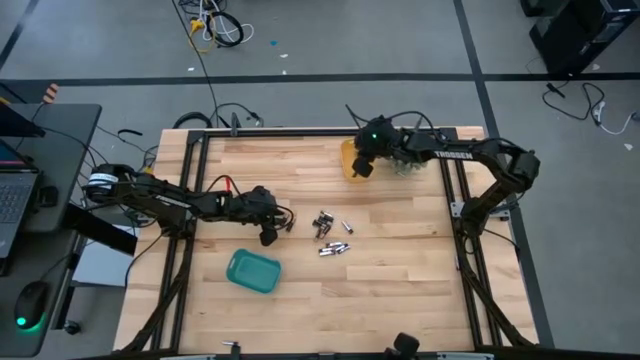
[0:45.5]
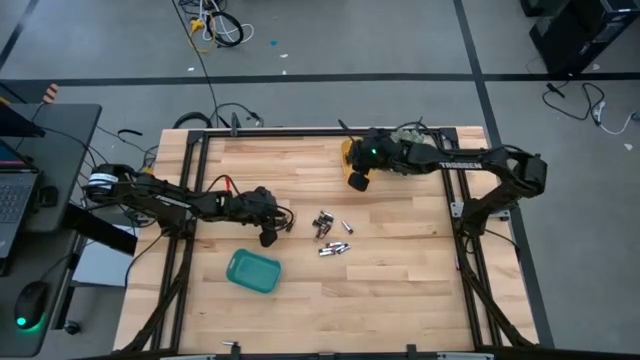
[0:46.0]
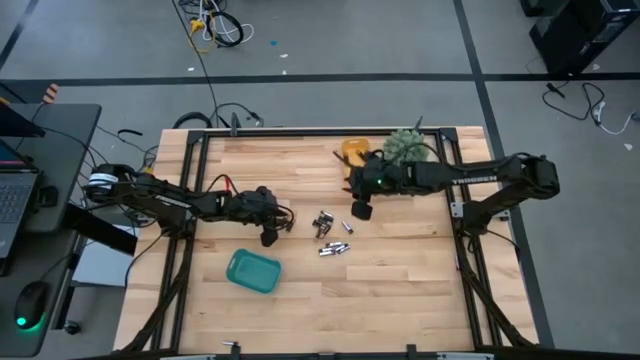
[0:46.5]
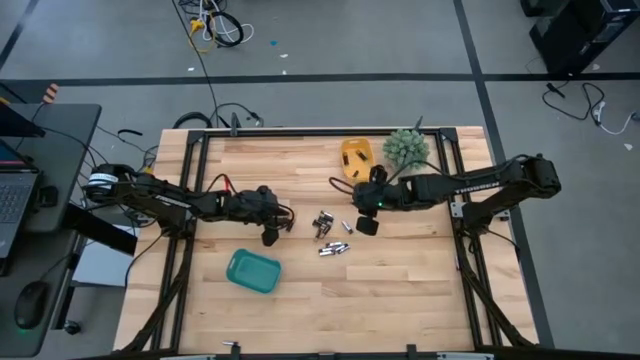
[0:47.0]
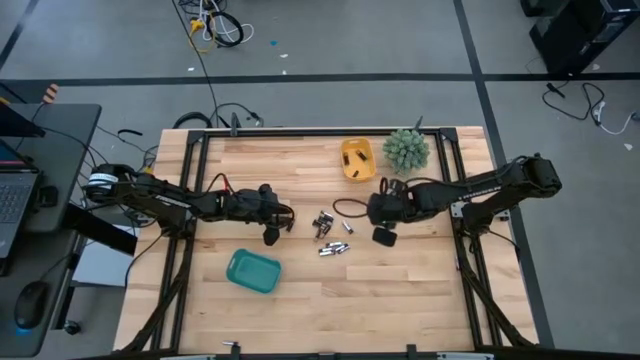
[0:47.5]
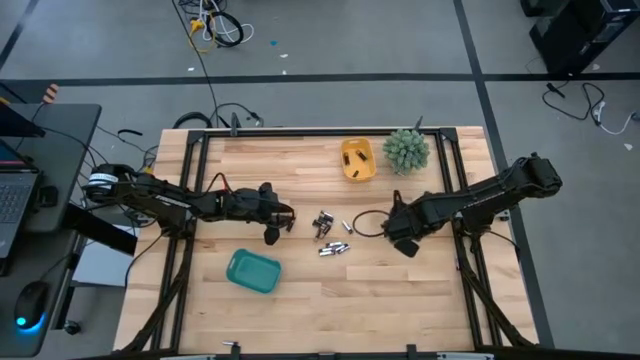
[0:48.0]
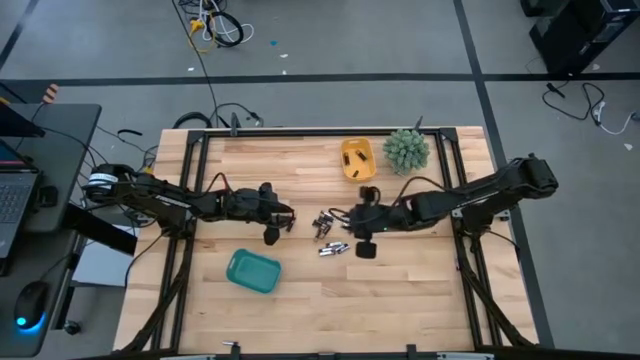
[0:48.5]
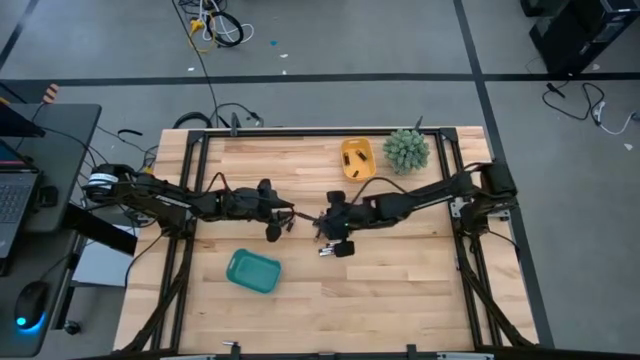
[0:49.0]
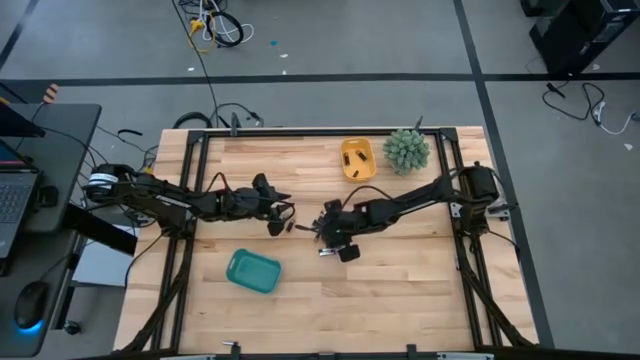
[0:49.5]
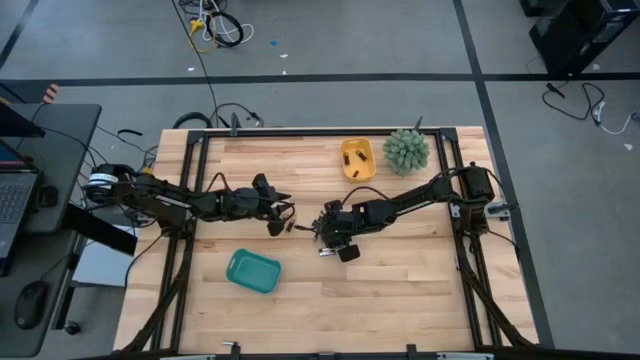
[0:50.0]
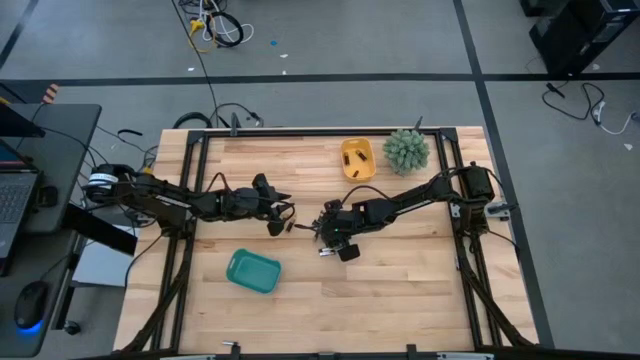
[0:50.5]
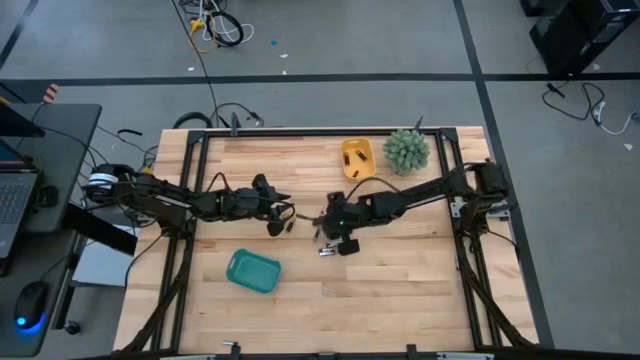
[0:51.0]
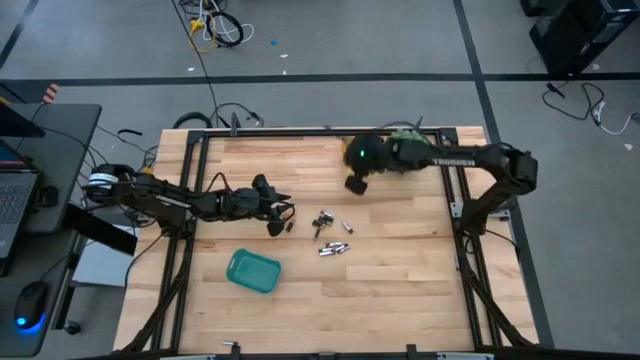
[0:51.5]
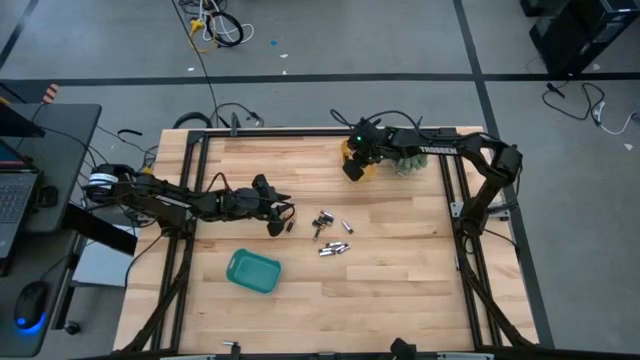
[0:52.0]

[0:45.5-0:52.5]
Task: Sort batteries
Put the black battery into the yellow bin

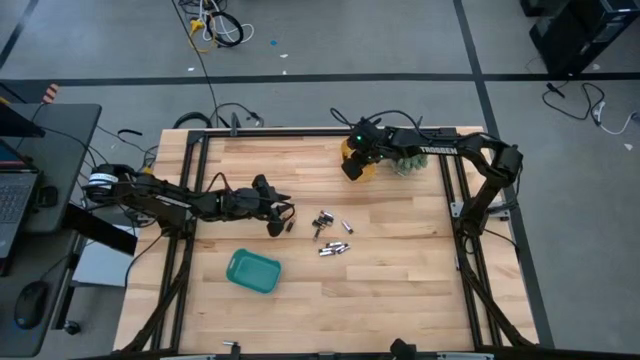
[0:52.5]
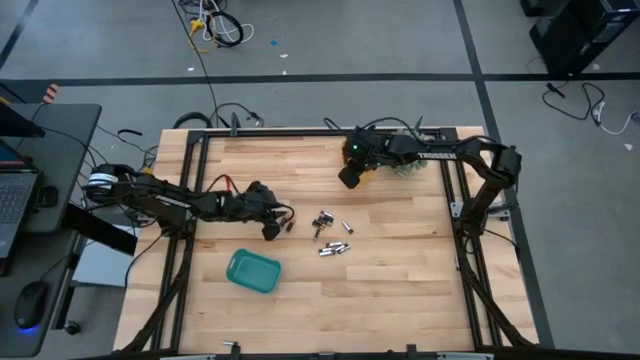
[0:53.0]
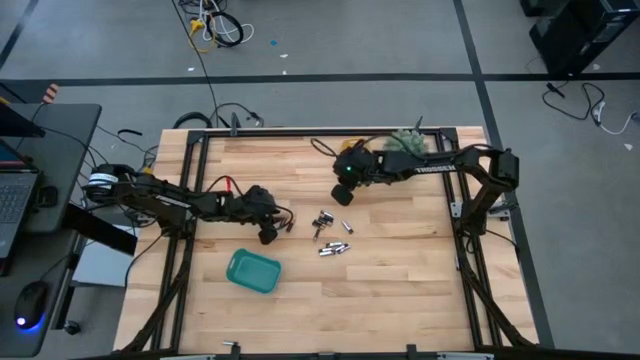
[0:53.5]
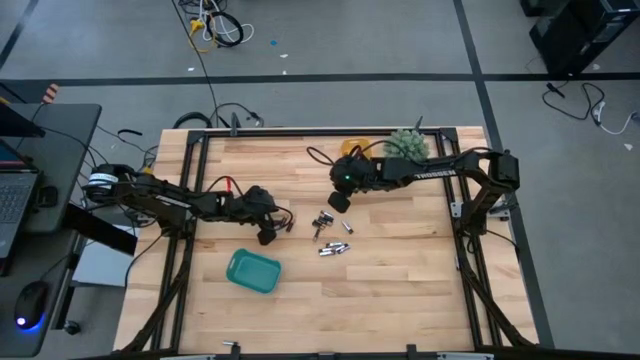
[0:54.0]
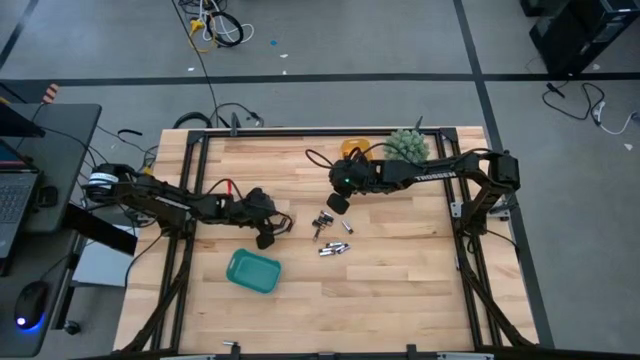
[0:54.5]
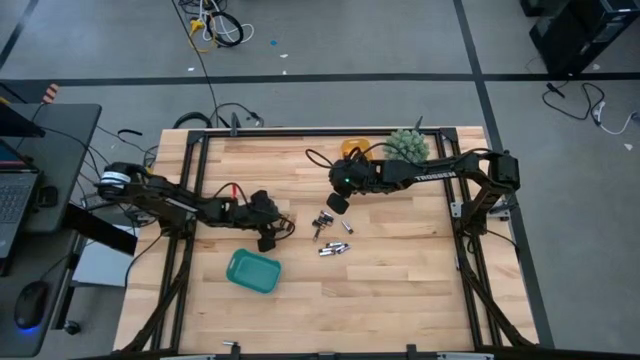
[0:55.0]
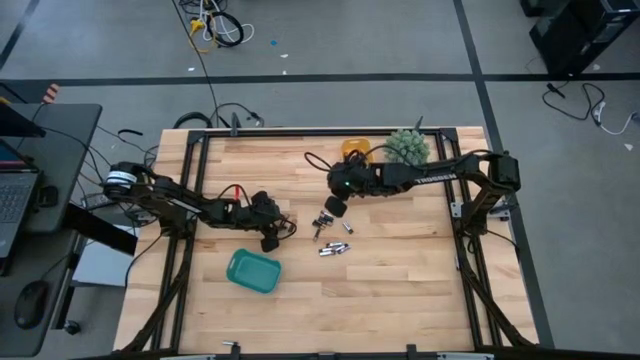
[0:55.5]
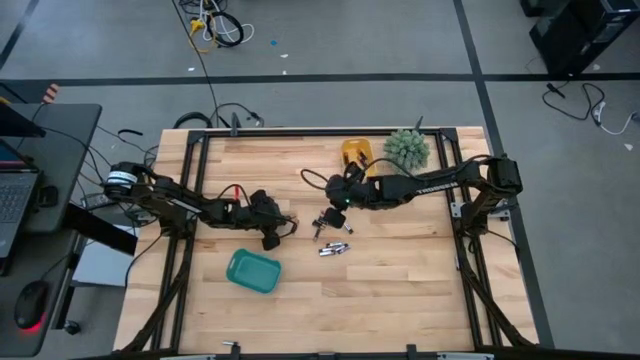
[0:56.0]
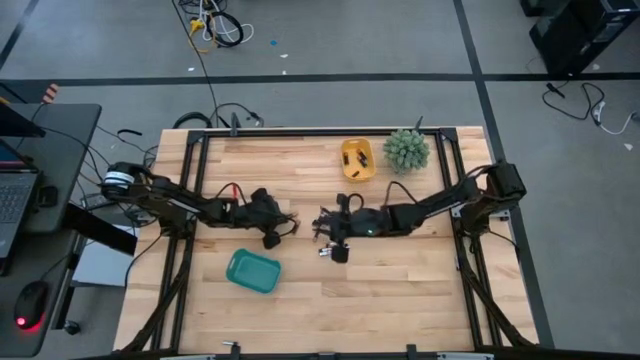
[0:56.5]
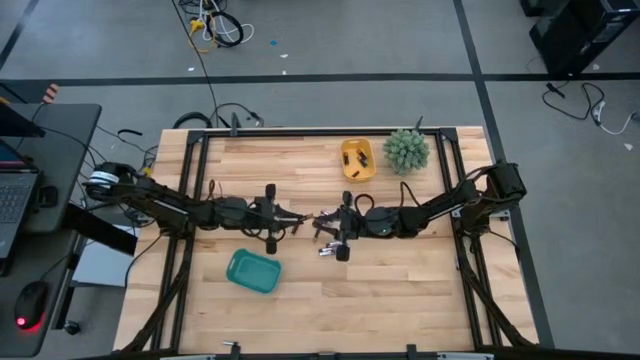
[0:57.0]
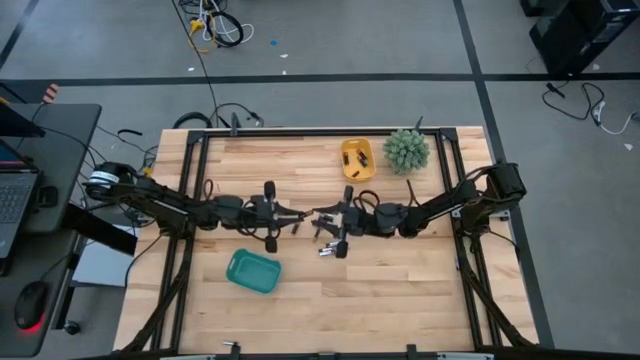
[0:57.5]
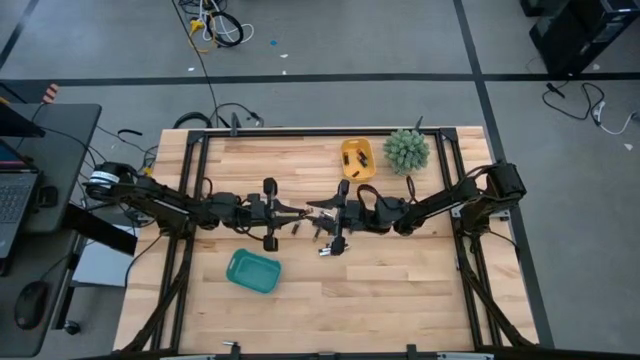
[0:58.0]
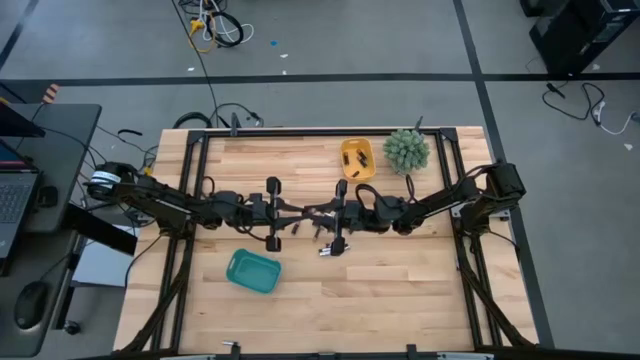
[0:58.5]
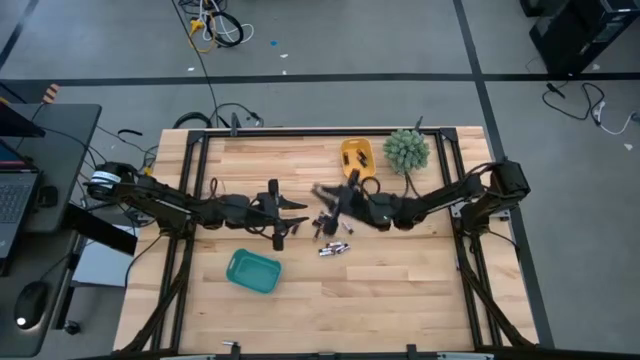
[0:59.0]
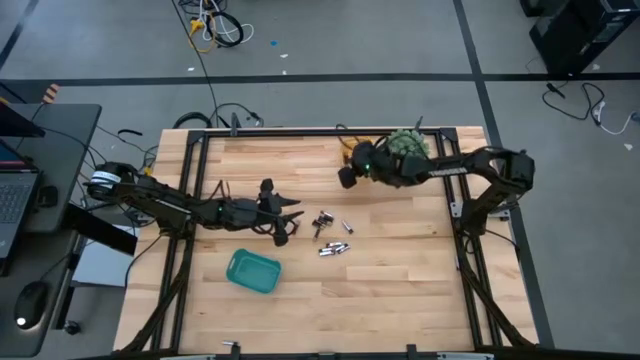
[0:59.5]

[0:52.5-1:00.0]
Put the black battery into the yellow bin

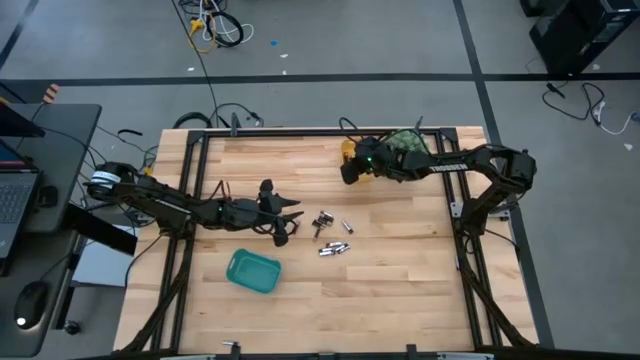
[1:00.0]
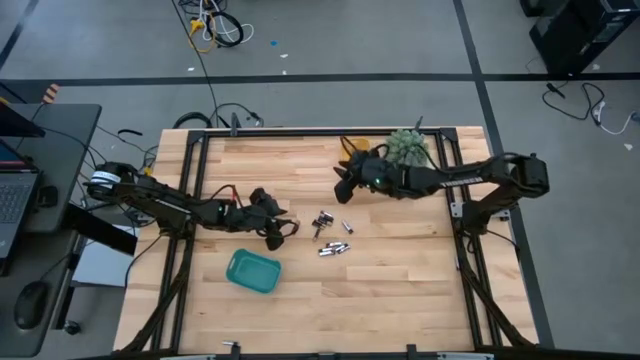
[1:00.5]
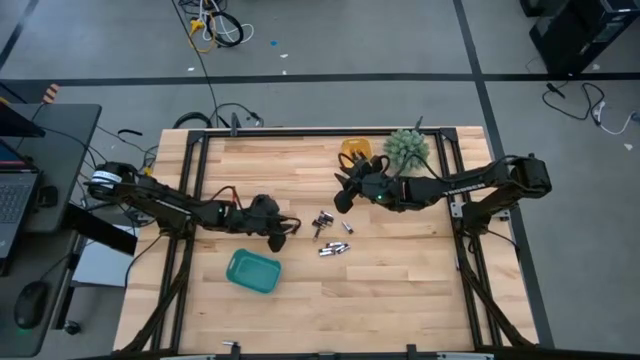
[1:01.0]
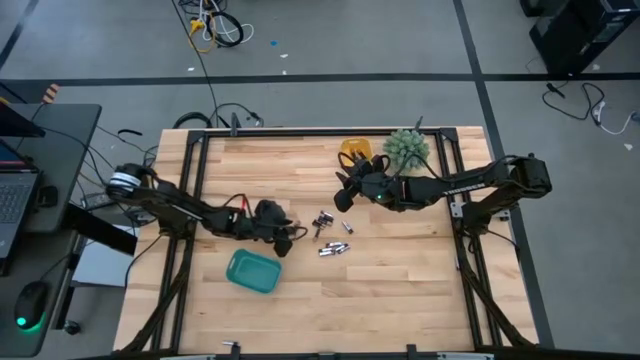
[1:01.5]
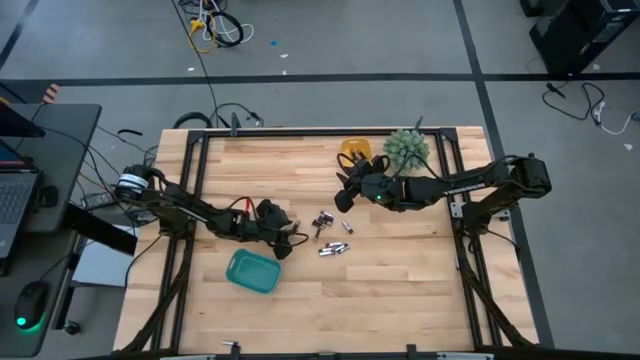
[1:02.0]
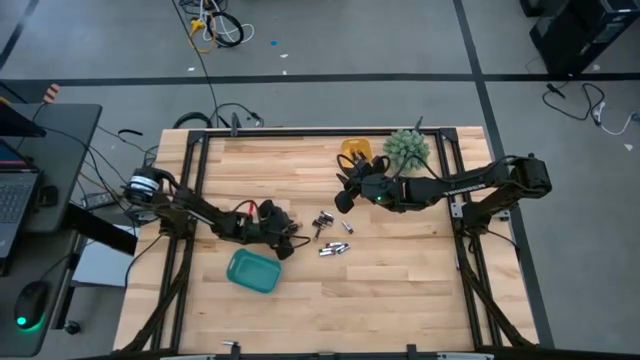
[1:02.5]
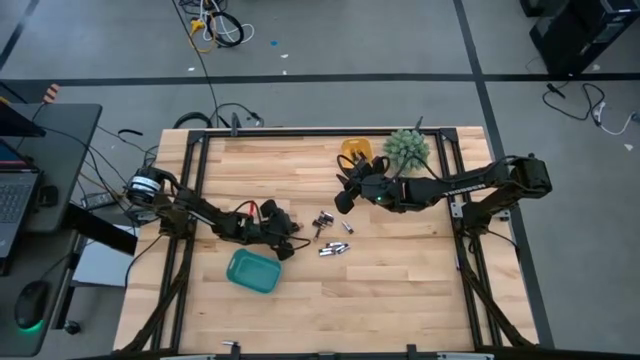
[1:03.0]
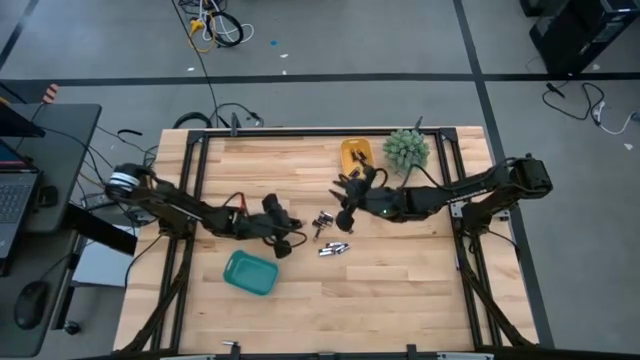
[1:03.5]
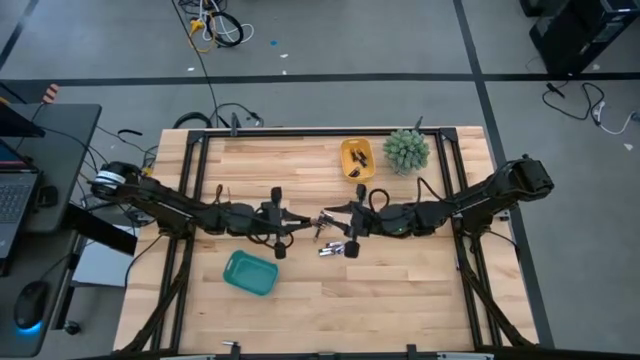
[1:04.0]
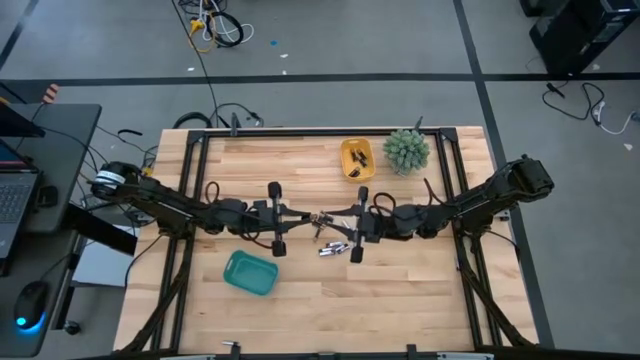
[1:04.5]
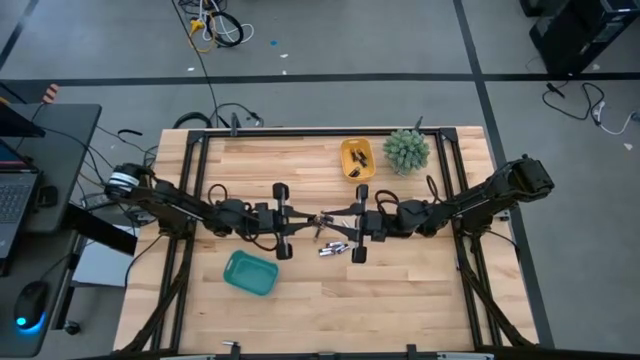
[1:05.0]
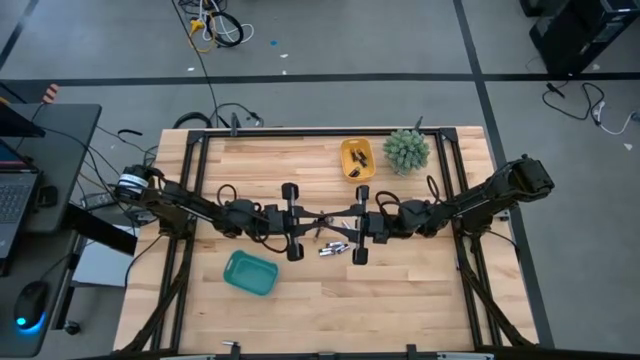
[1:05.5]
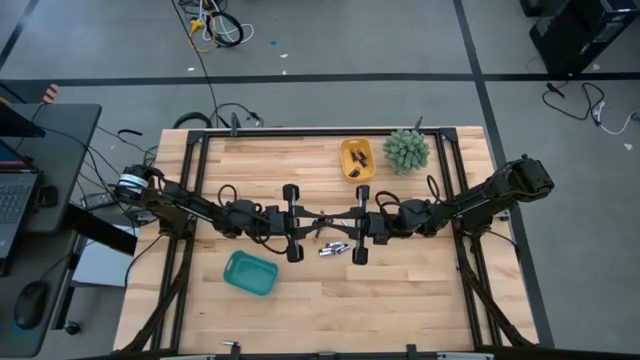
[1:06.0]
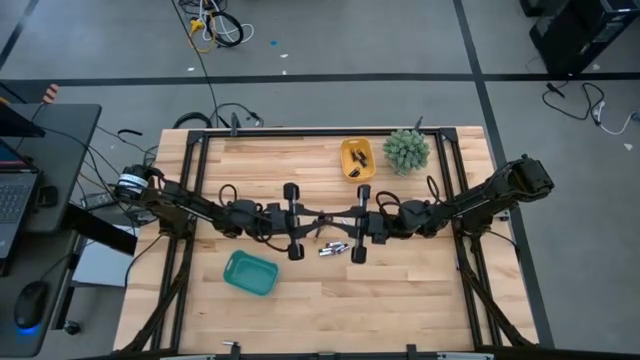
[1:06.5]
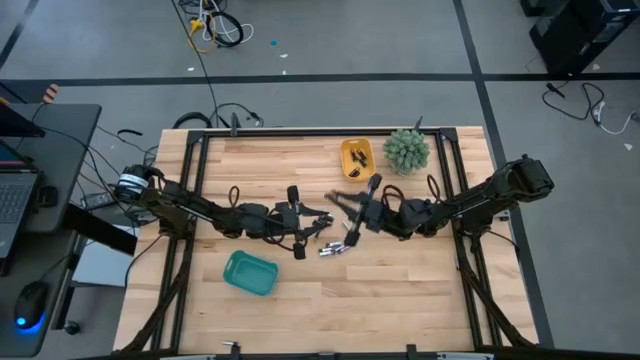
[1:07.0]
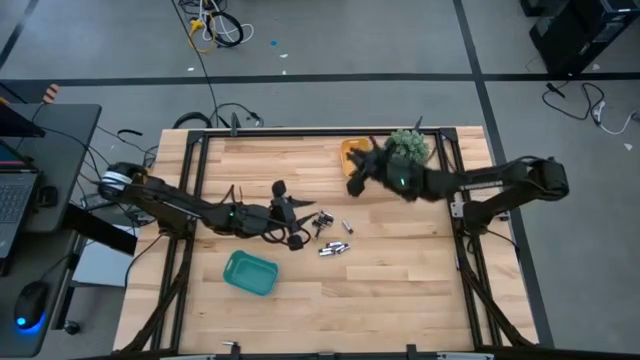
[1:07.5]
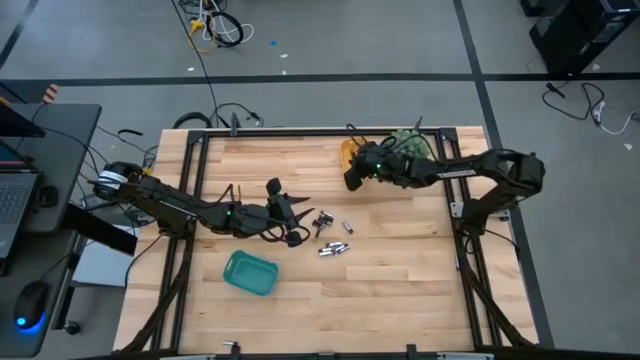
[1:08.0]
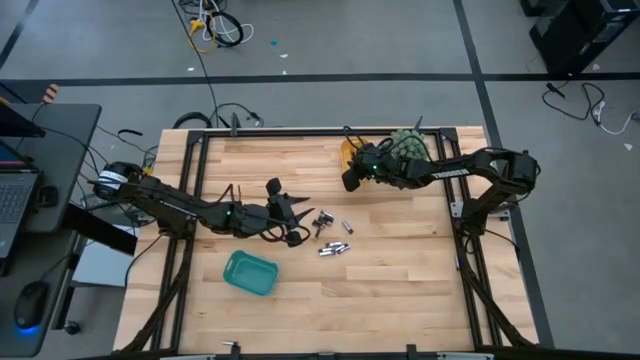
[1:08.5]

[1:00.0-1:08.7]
Put the black battery into the yellow bin
